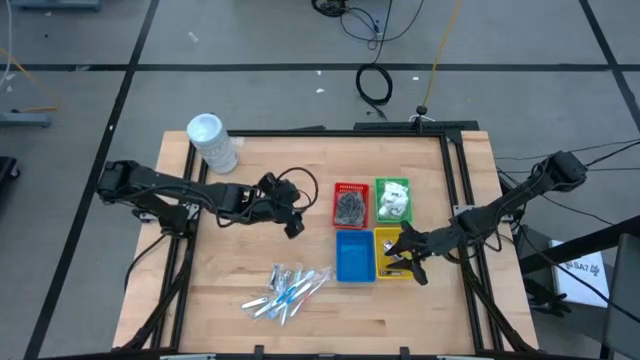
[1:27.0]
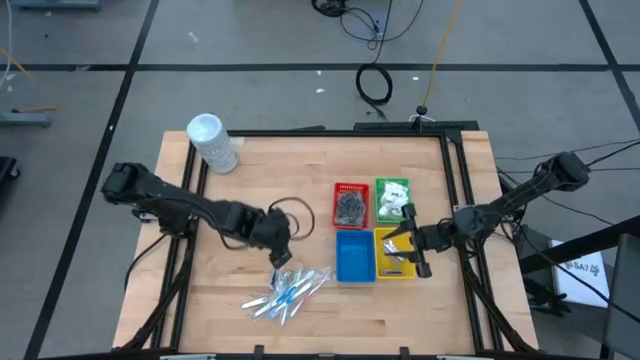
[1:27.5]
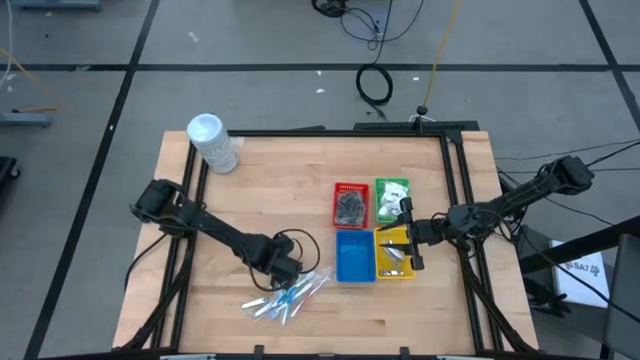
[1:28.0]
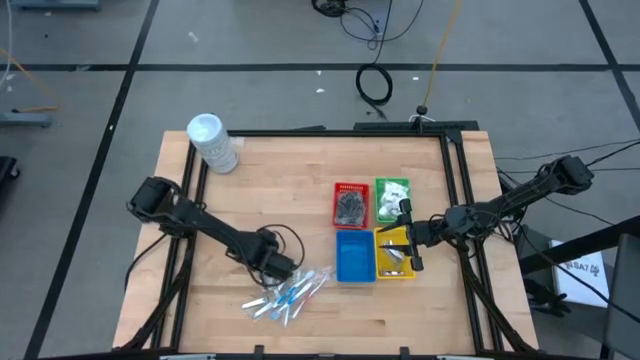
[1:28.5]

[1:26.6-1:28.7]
Task: Pick & Place Travel size toiletries
Put the silver nail cutter into the yellow bin

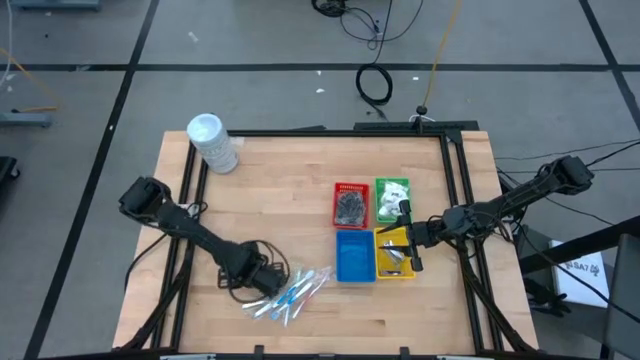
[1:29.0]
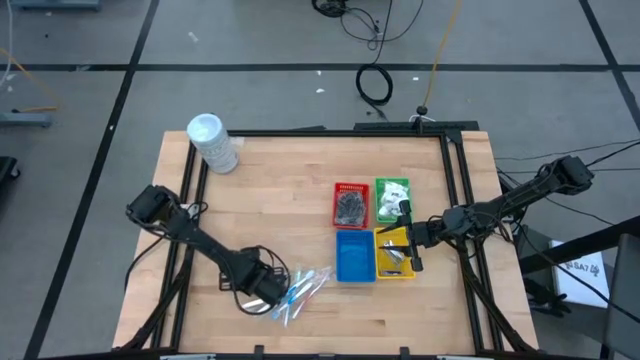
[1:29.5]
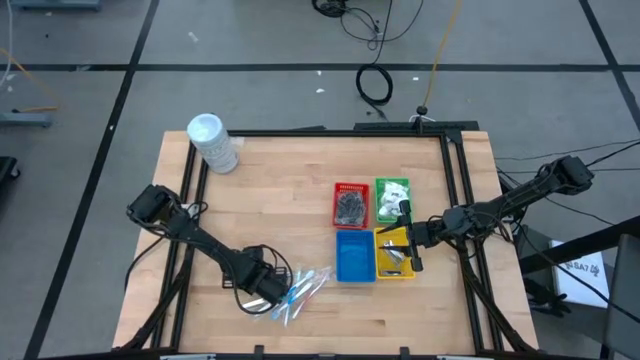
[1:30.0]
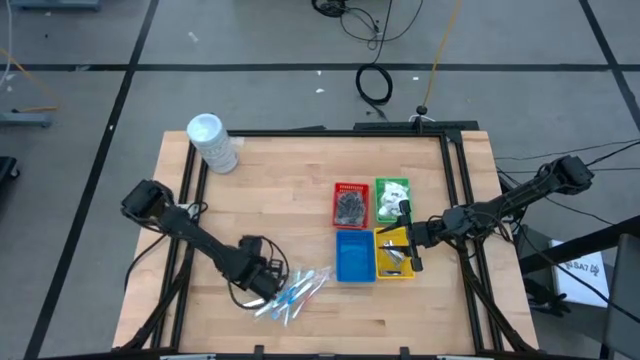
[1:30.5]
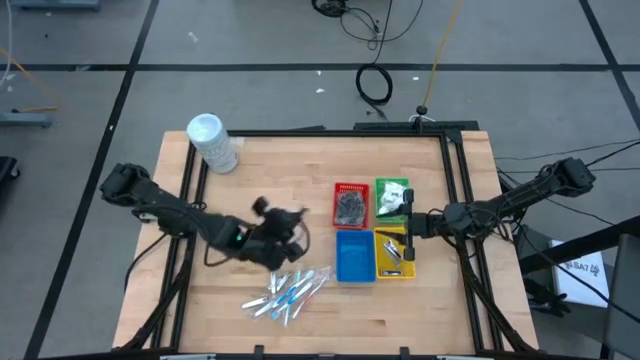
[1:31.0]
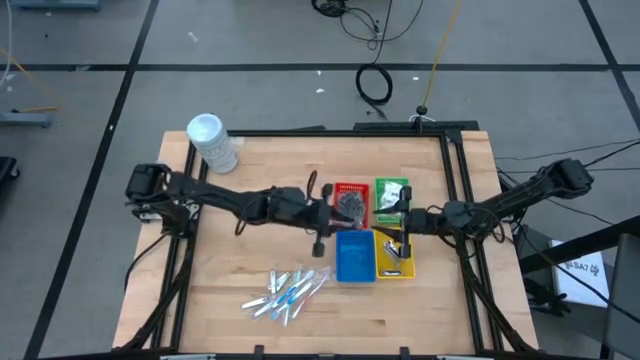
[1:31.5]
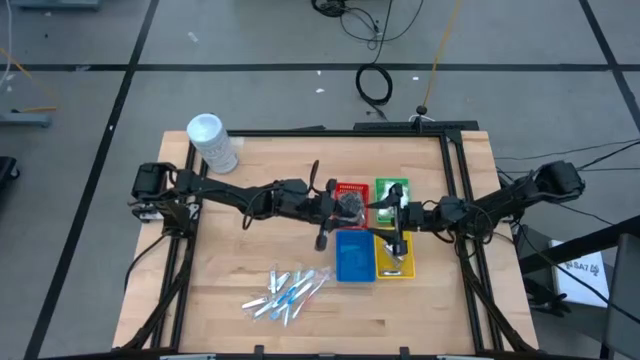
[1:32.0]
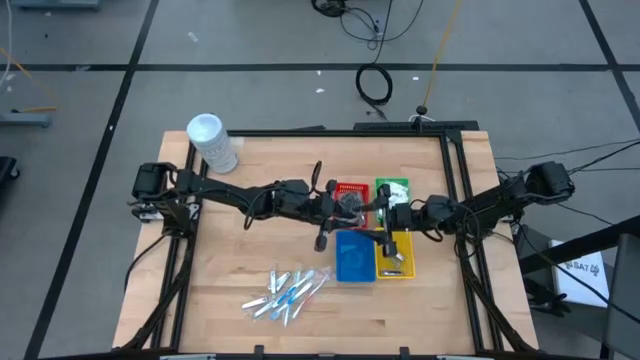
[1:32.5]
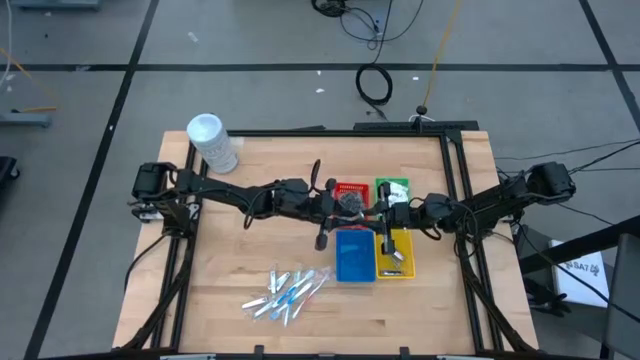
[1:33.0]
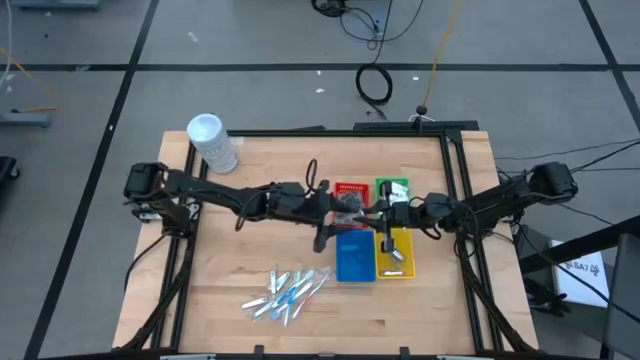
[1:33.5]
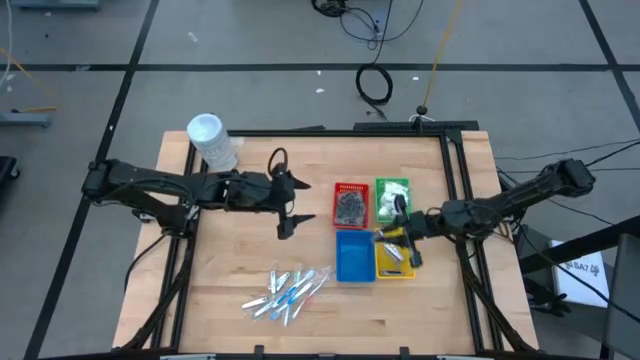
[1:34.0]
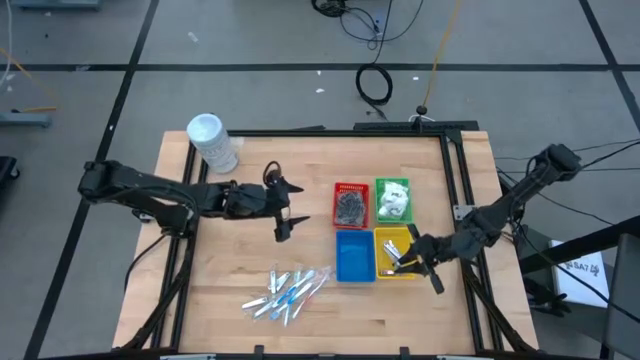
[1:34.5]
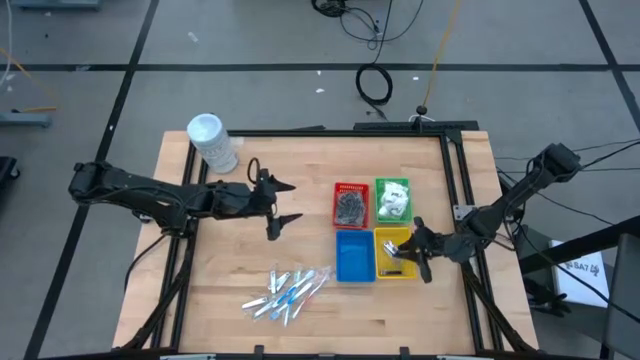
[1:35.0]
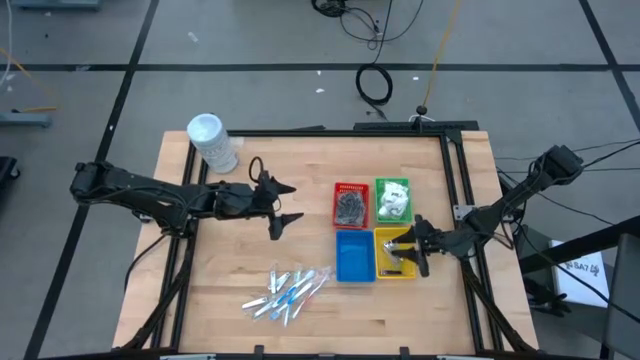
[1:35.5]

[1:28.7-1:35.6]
Put the silver nail cutter into the yellow bin

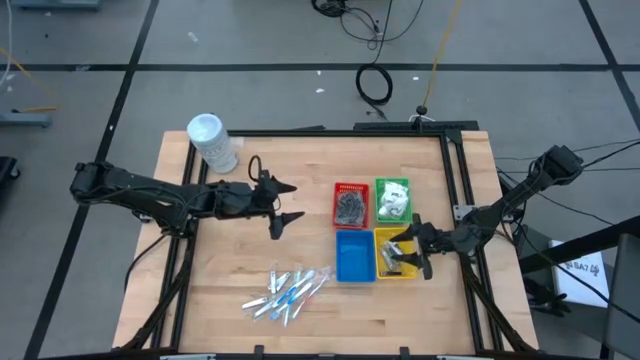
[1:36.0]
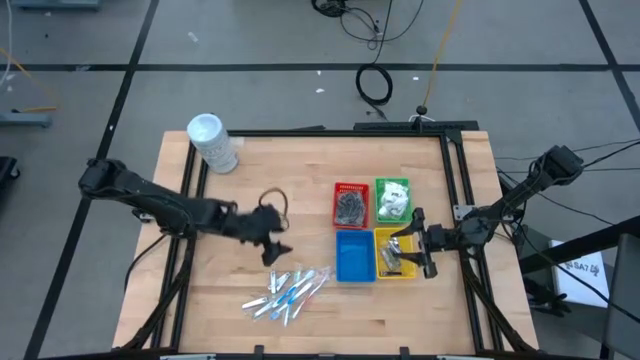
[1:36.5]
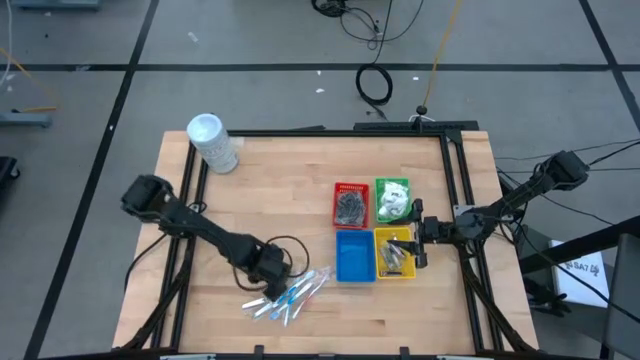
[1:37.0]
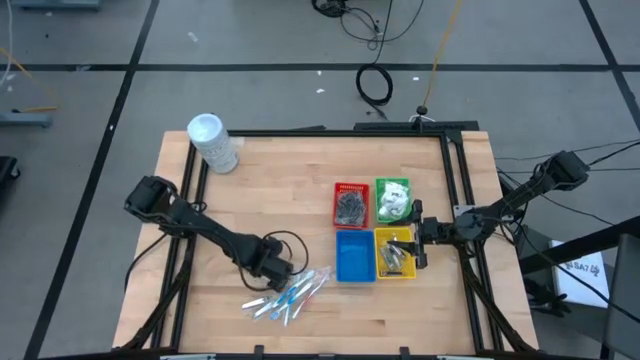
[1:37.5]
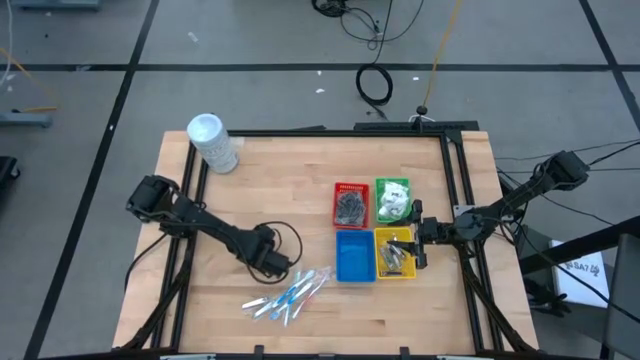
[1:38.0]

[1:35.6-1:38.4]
Move the silver nail cutter to the middle left of the table

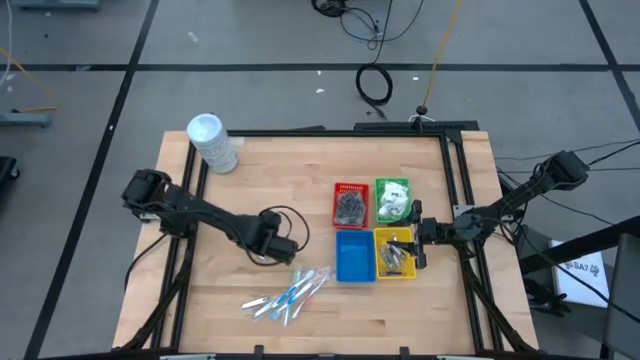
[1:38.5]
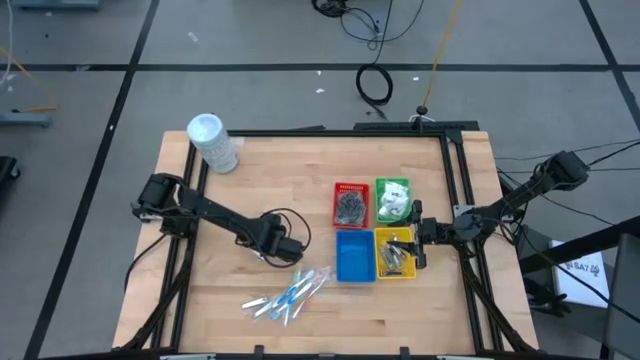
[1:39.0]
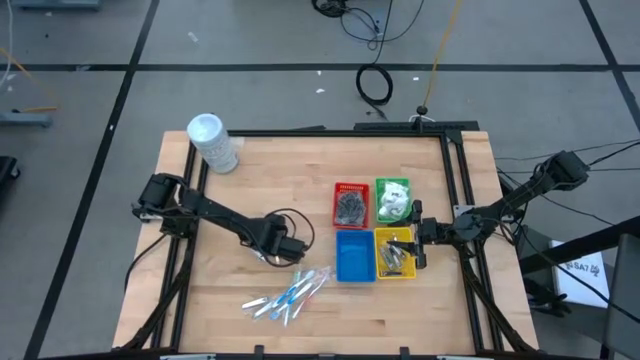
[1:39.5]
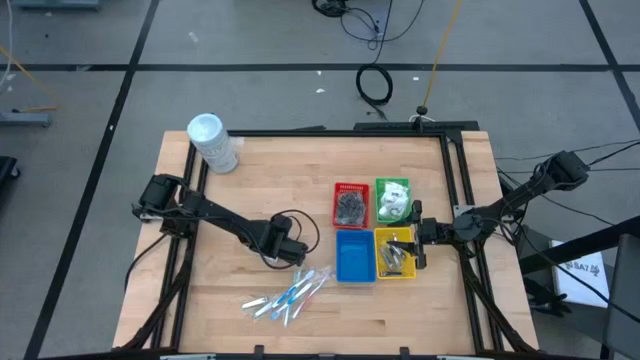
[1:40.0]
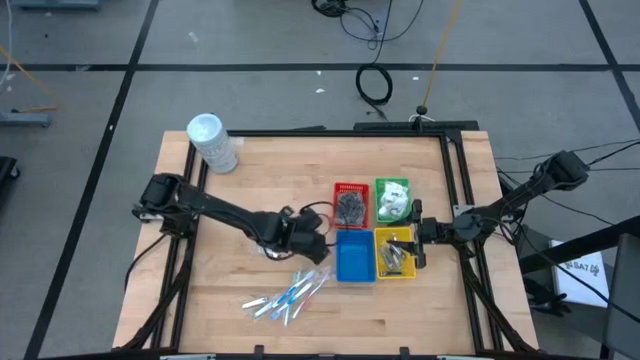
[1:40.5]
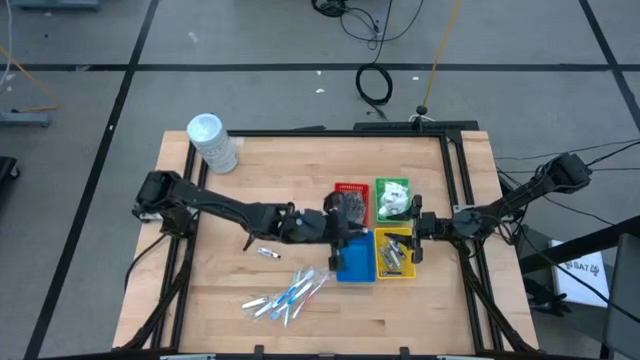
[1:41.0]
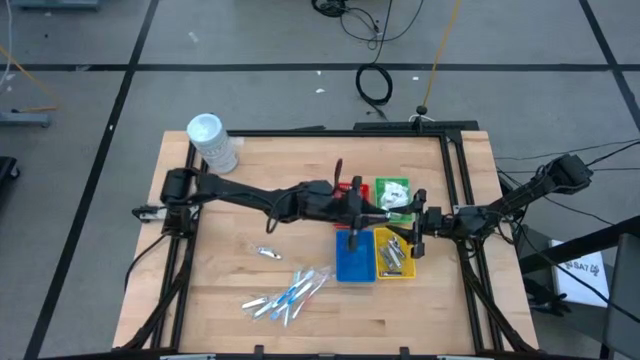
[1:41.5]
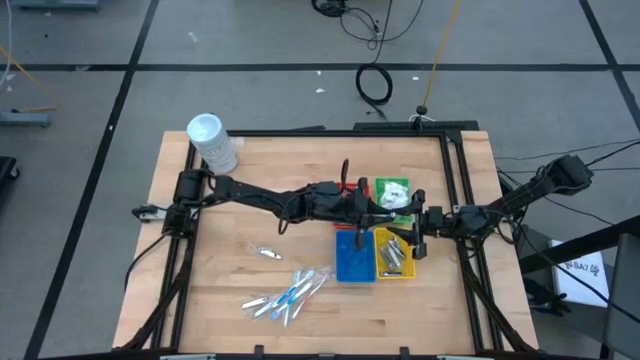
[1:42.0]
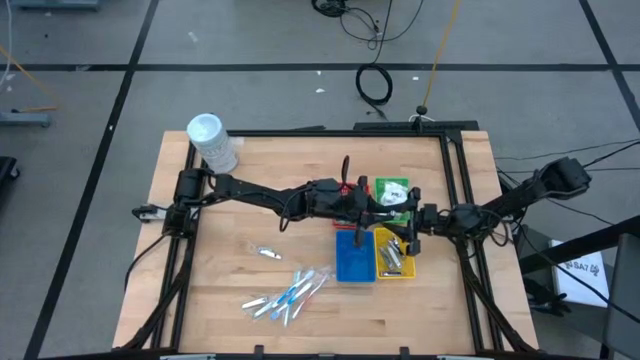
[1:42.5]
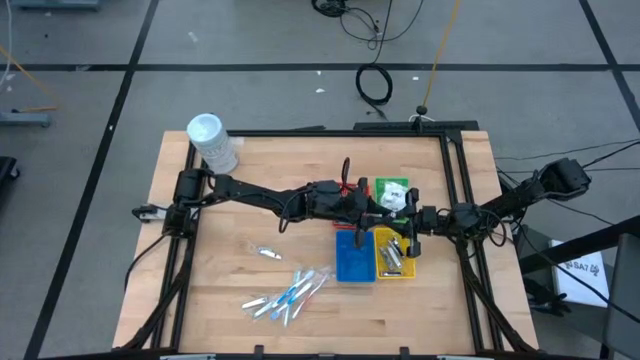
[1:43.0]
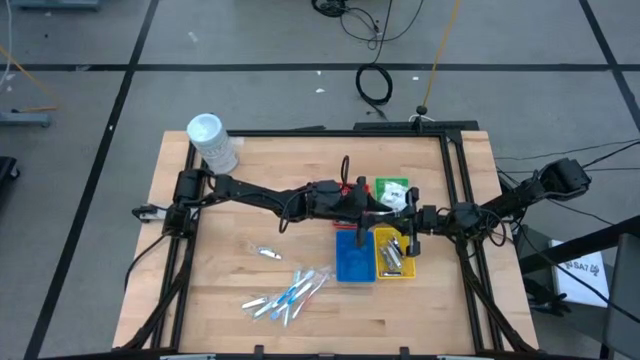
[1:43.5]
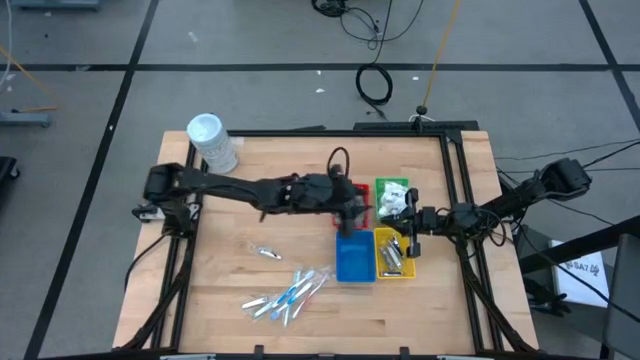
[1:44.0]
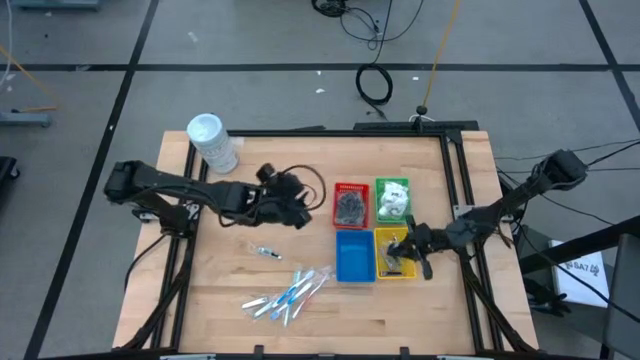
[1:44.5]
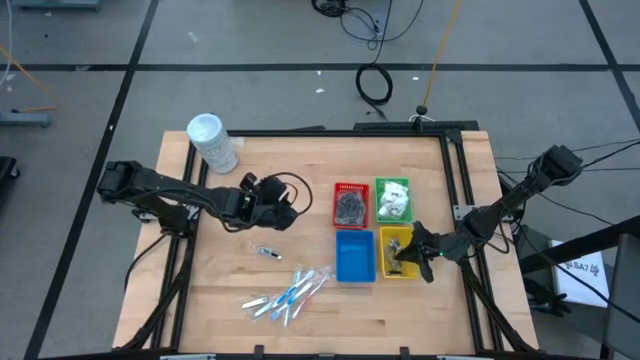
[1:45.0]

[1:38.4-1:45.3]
Put the silver nail cutter into the yellow bin

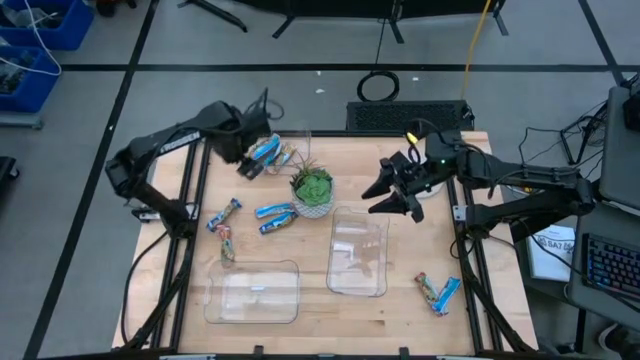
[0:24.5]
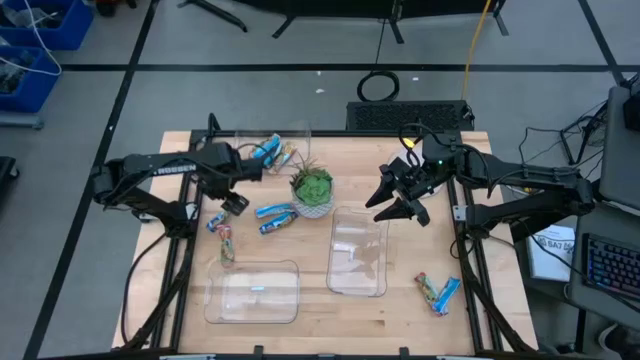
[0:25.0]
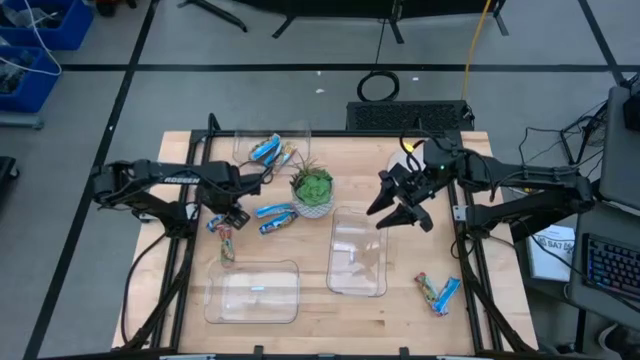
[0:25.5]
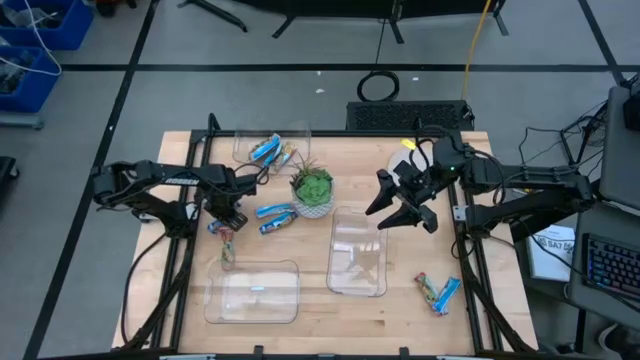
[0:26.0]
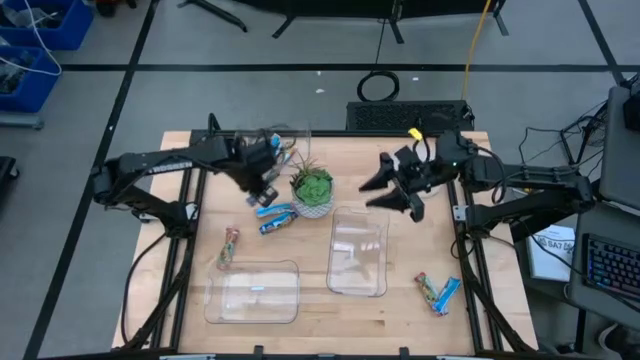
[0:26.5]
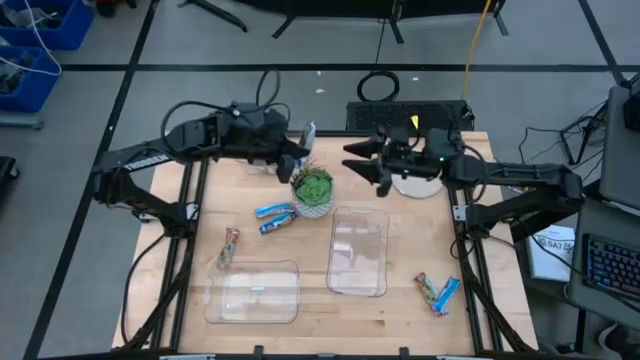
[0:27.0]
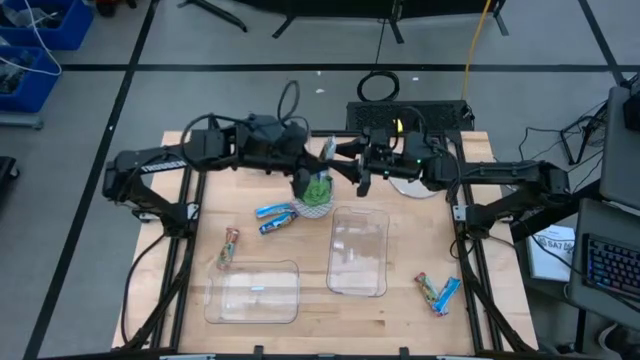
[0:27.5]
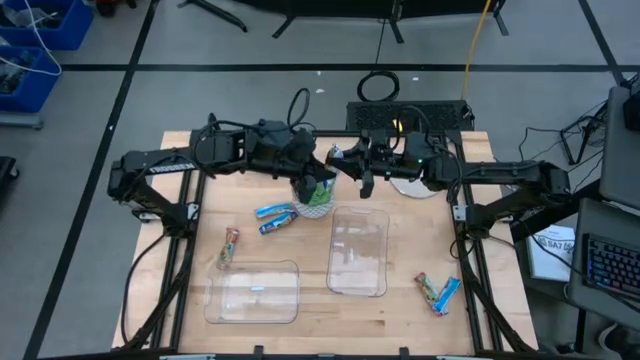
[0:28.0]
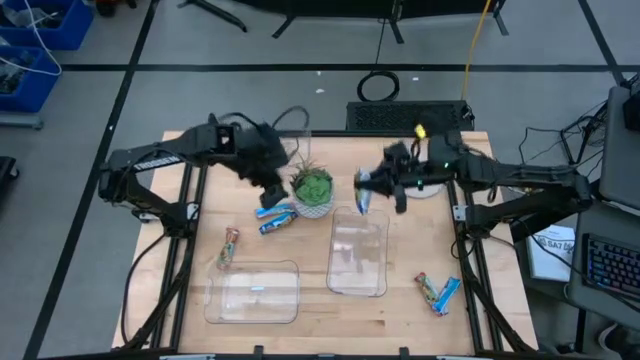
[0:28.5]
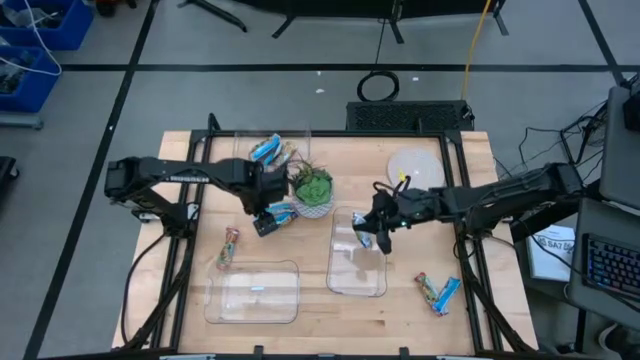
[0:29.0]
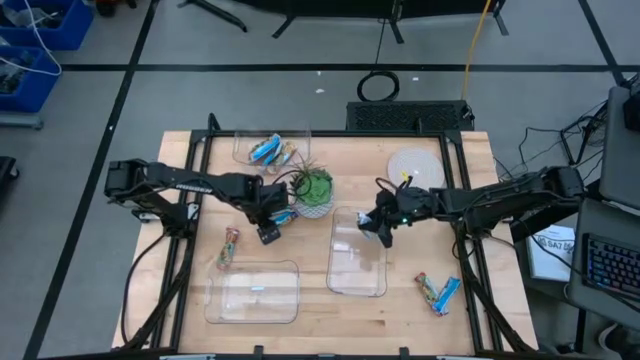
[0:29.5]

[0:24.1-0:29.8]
Task: Pick and place Granola Bars by type
Put the top left blue granola bar into the middle transparent bin
